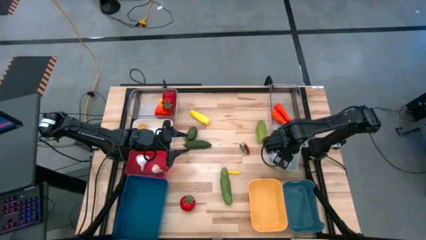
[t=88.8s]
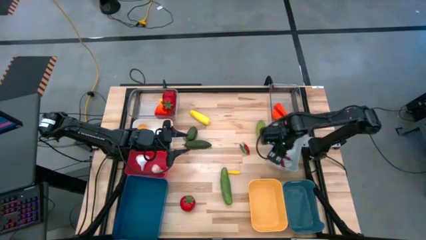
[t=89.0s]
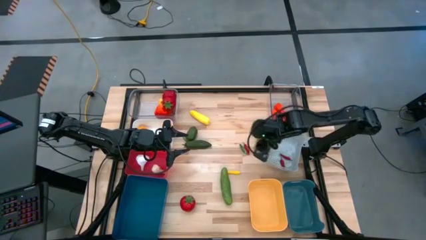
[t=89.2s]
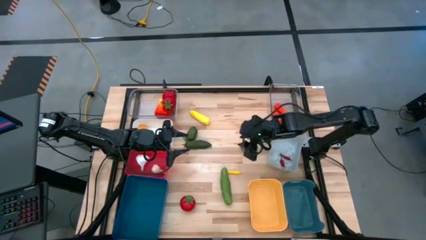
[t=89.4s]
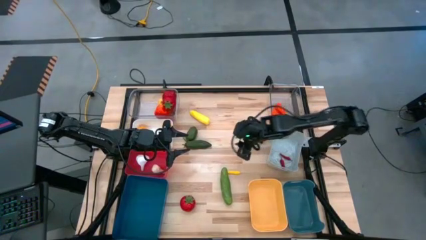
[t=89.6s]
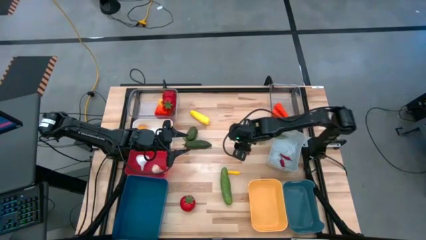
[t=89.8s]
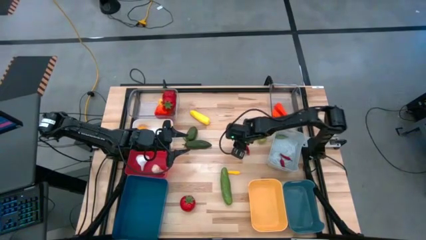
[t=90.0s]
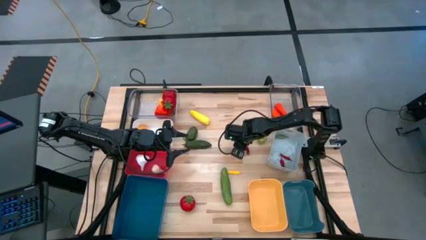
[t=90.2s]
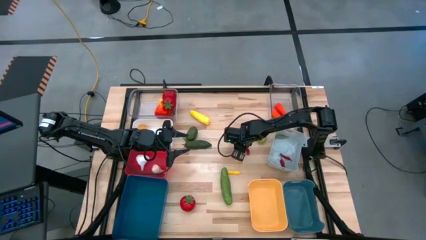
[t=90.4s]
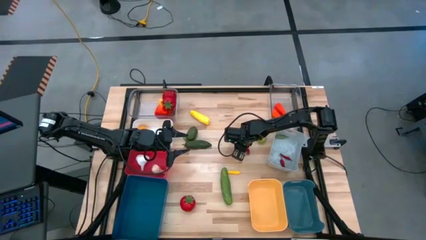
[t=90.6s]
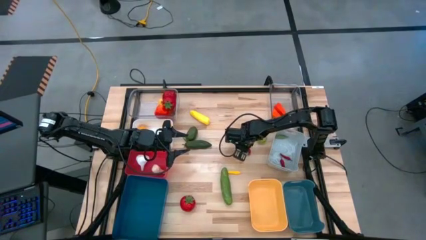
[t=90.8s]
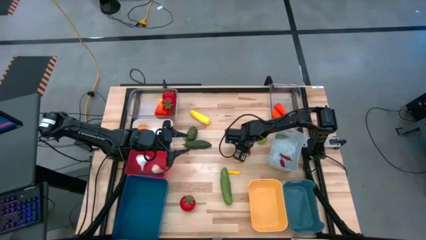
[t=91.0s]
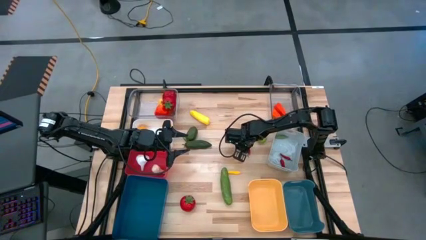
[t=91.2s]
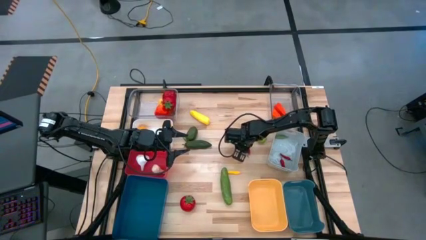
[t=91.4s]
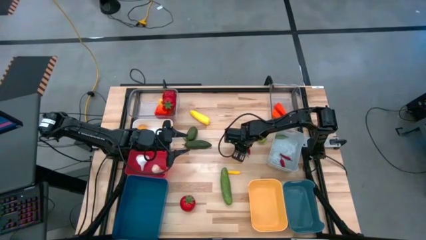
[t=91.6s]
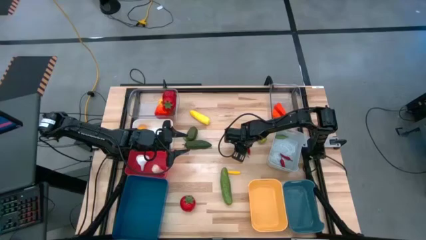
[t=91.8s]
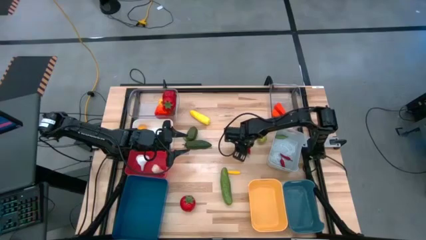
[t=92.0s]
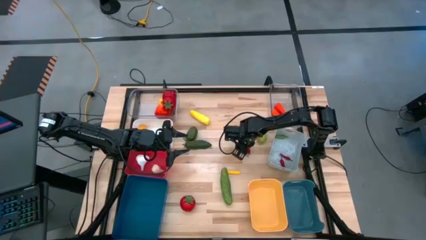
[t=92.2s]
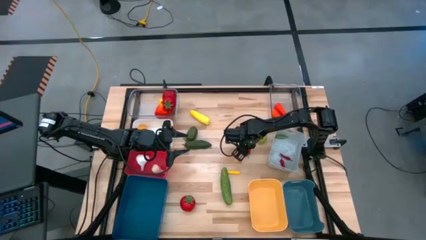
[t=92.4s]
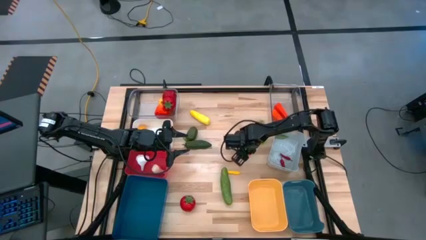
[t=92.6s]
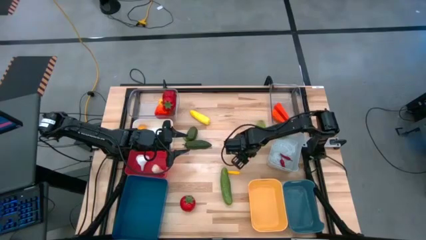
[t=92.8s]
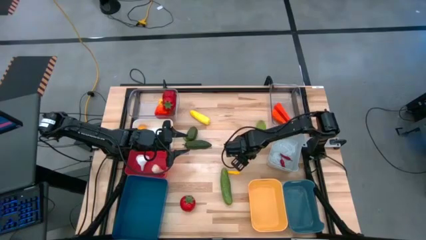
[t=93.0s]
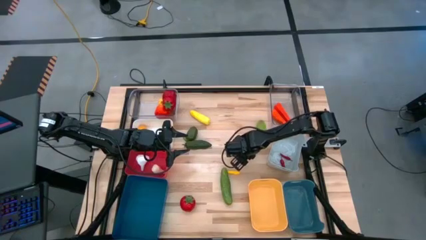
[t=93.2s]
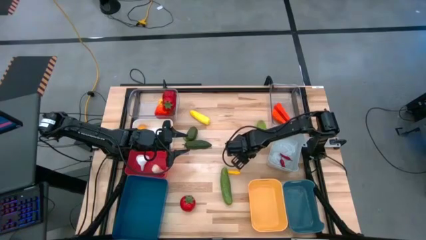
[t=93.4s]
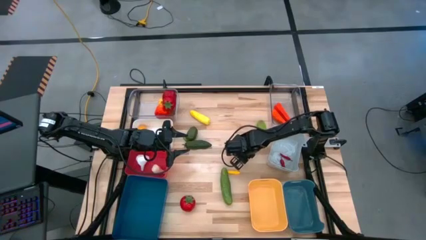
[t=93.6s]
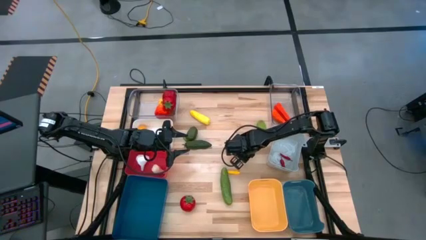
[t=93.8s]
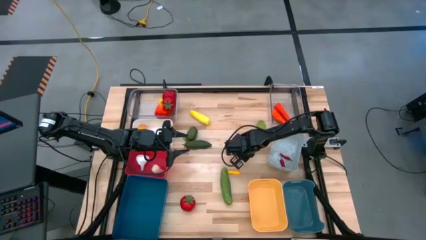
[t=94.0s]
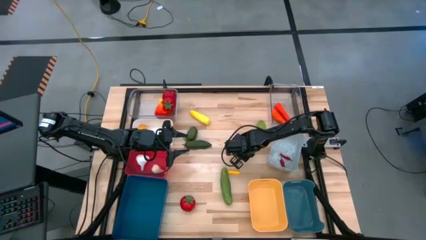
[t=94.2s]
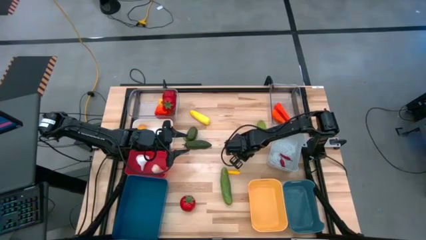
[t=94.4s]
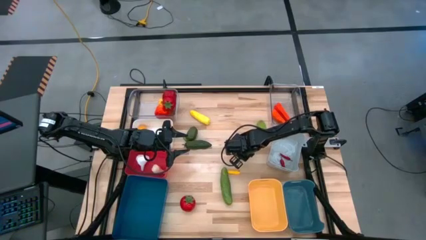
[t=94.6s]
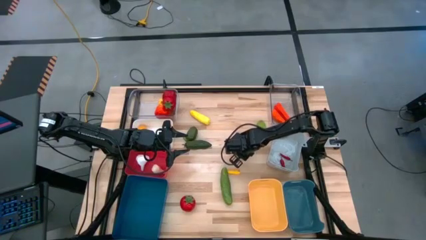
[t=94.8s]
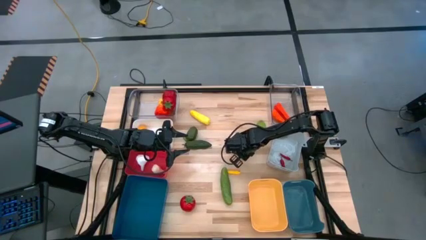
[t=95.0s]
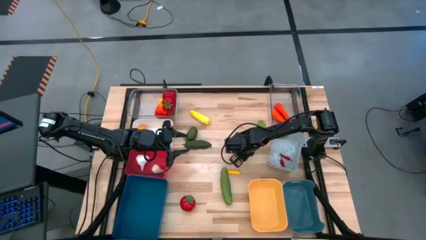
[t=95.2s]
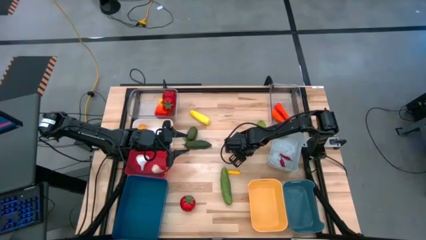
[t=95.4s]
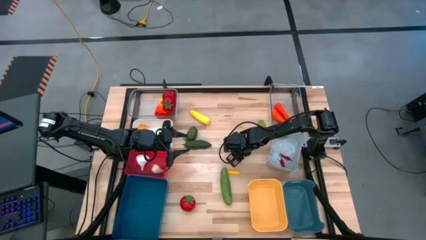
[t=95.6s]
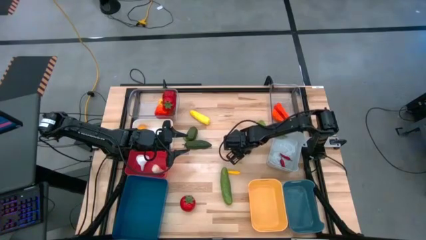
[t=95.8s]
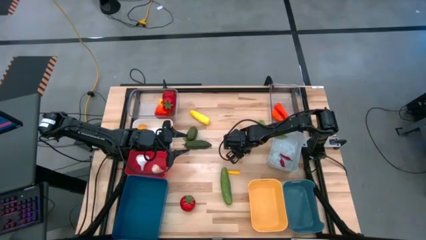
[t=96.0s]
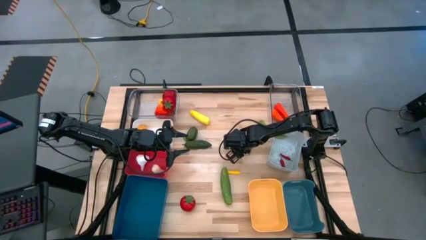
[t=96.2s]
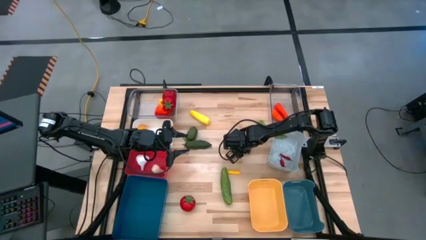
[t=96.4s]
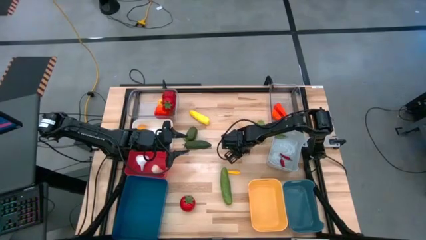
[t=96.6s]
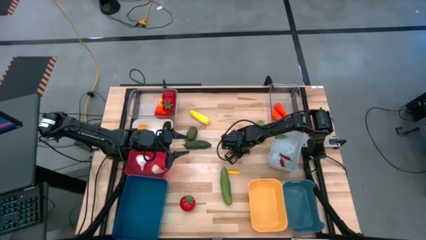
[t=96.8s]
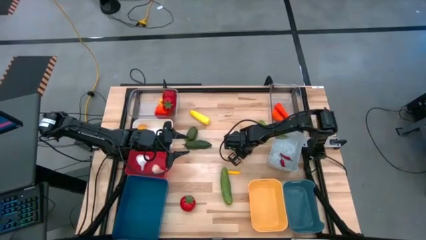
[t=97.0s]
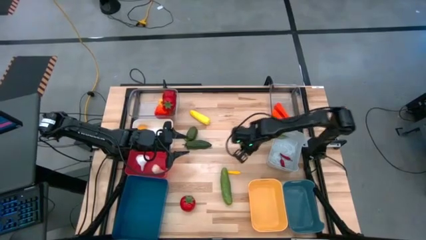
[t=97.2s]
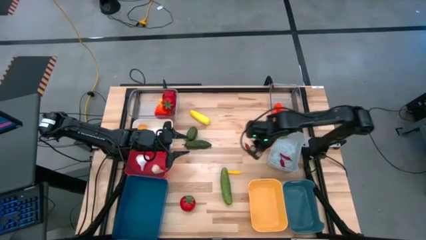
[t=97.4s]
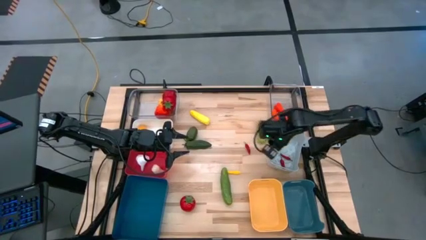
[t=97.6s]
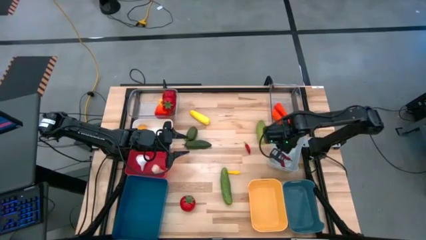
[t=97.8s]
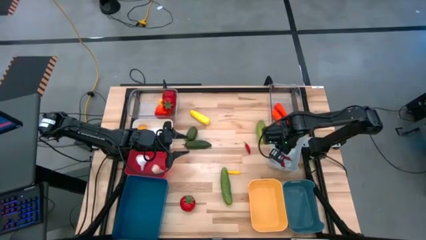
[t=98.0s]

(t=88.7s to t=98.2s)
Task: Sort produce into baskets
Put the right green chili into the gray bin

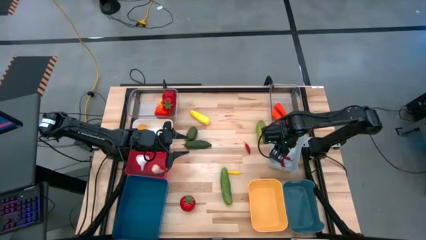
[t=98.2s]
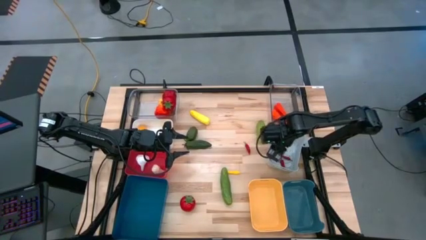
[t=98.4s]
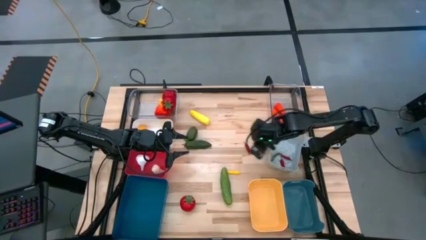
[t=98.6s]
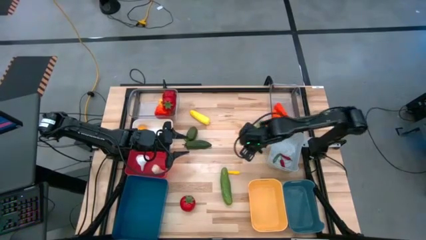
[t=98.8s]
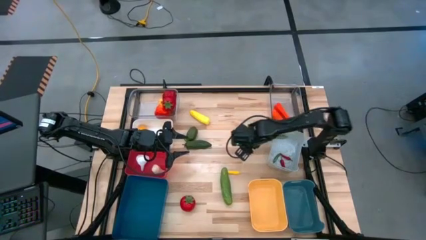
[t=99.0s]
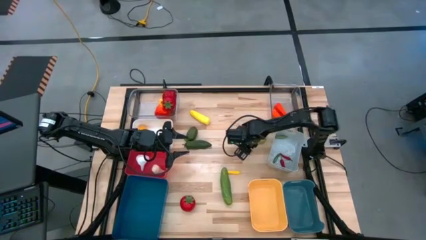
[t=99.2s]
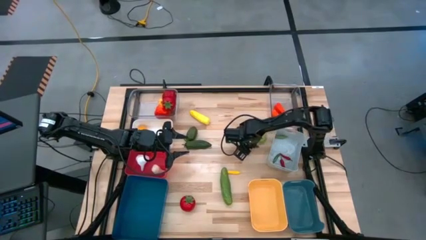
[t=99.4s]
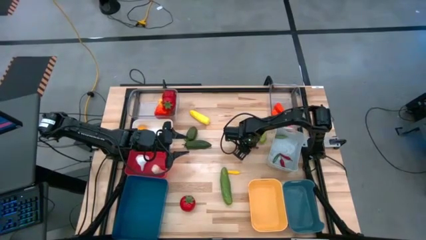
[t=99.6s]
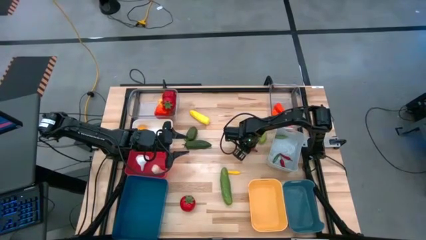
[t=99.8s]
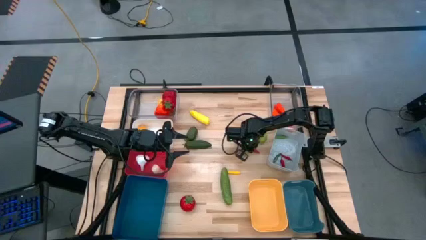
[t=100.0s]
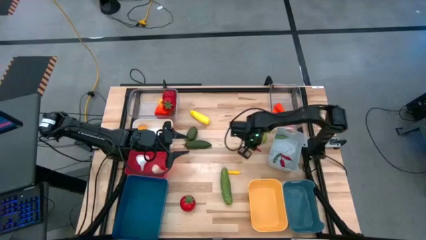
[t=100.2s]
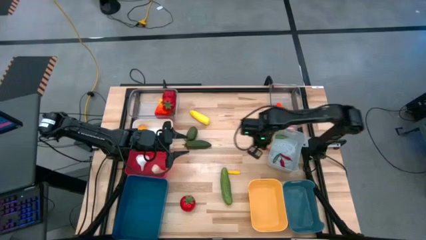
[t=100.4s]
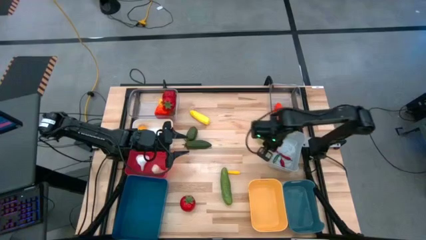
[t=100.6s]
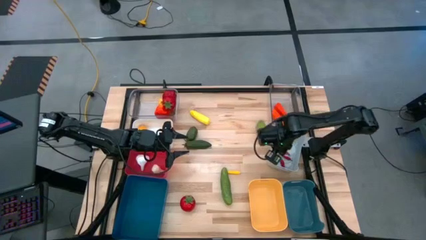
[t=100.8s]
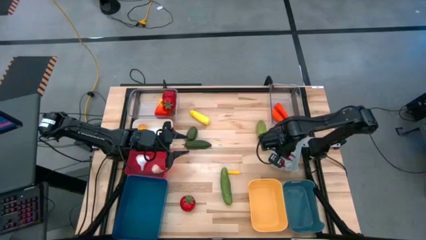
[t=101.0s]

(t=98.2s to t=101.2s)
Put the red chili into the gray bin

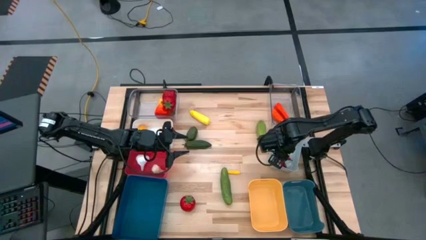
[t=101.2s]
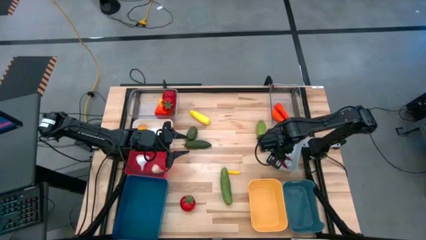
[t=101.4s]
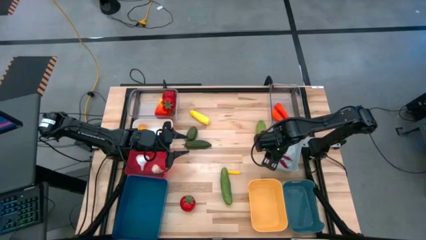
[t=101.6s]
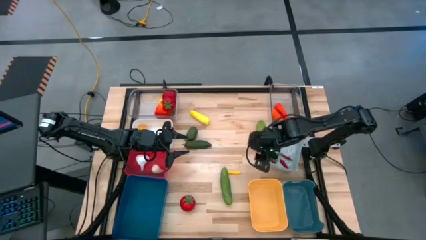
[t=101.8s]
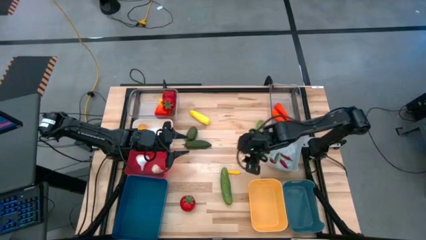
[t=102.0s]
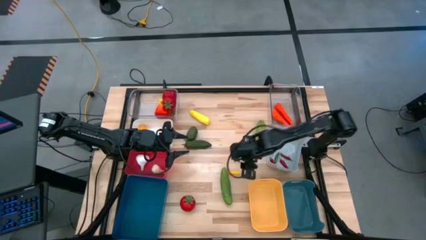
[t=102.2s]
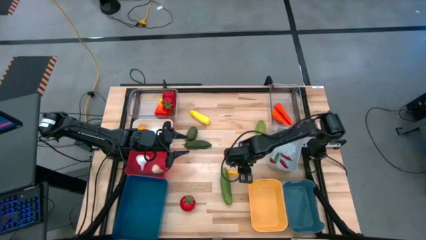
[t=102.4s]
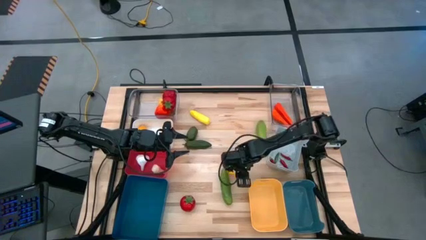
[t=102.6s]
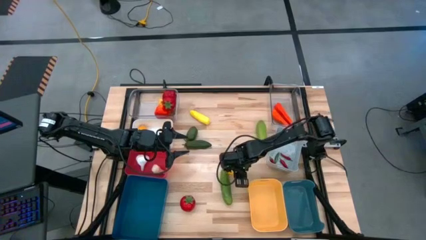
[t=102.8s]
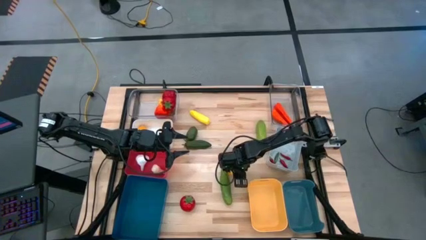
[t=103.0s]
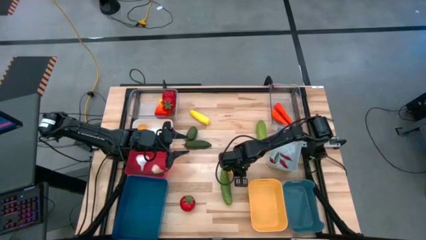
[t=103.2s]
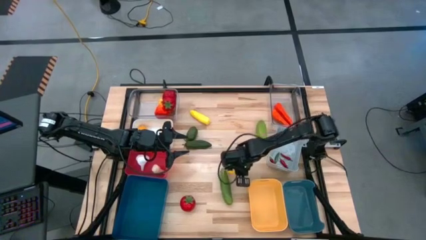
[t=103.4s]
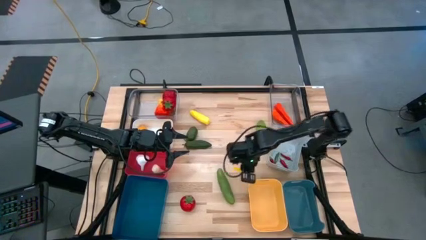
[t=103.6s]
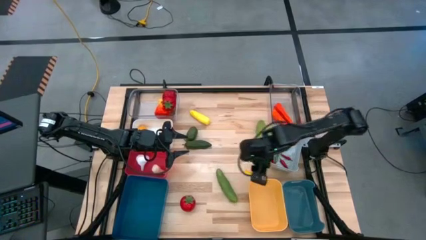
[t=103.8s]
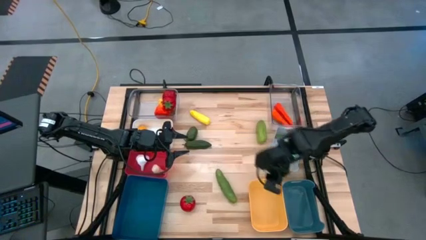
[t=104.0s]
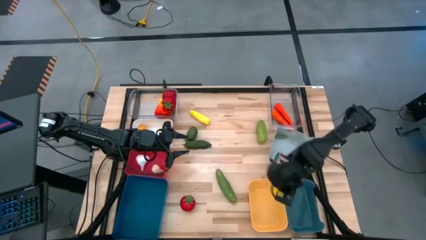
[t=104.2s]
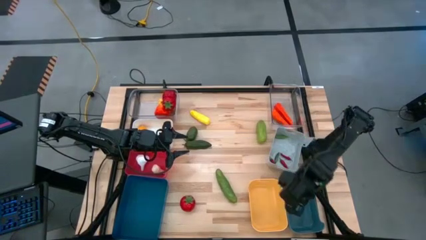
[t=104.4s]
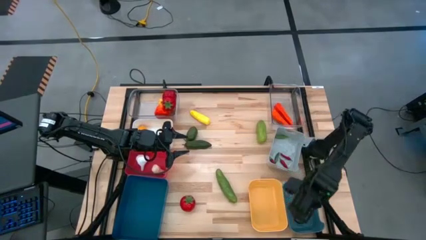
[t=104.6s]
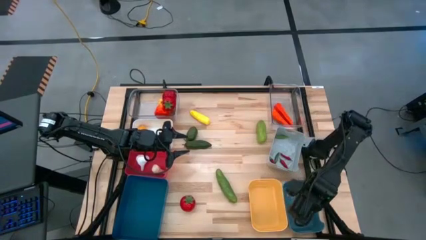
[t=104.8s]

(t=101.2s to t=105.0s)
Put the small yellow corn into the right blue bin
